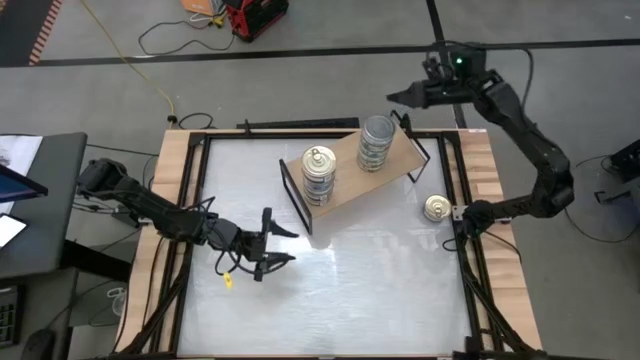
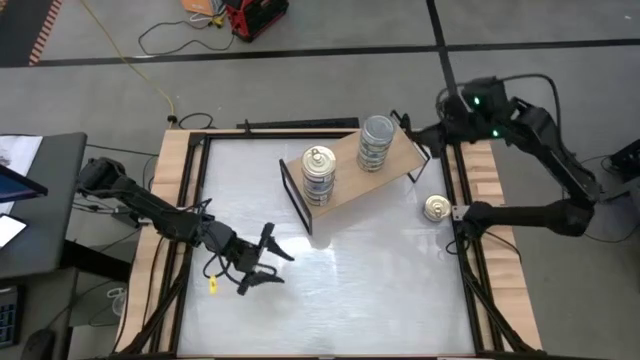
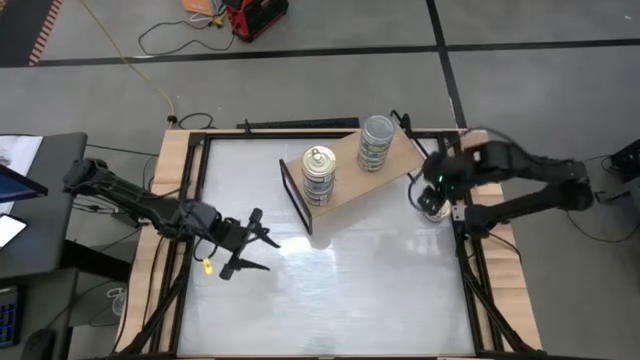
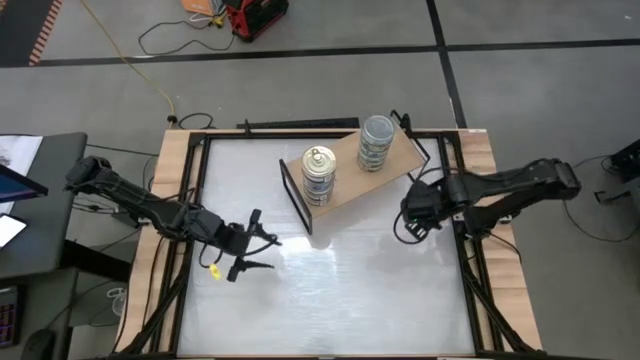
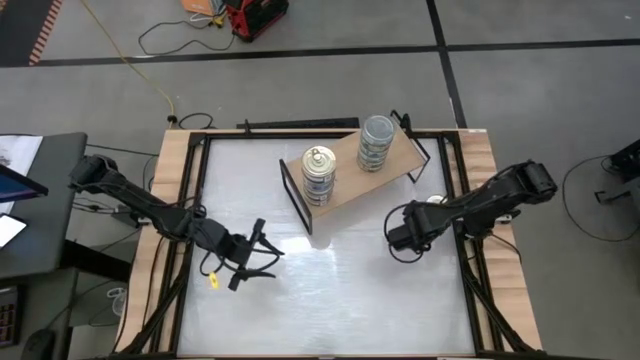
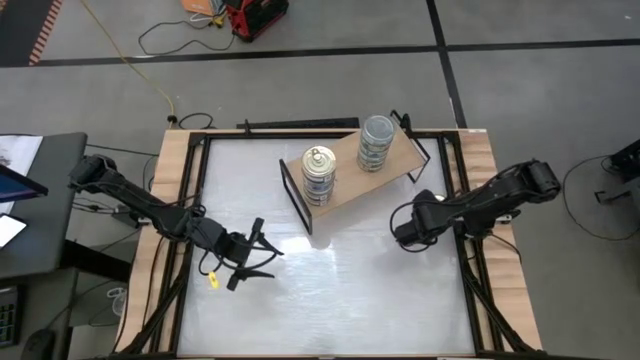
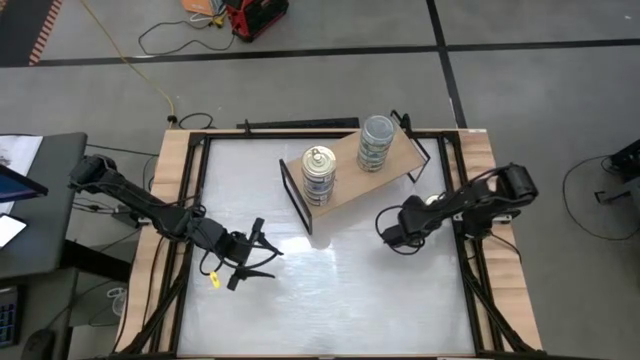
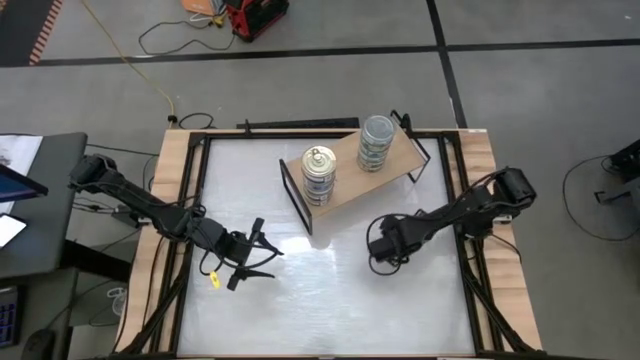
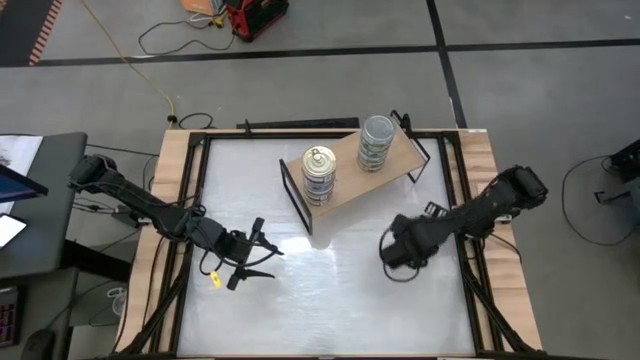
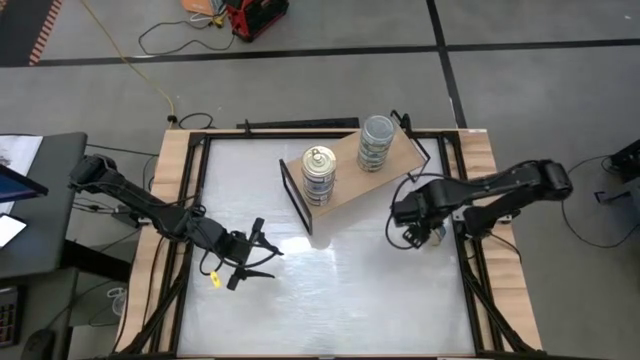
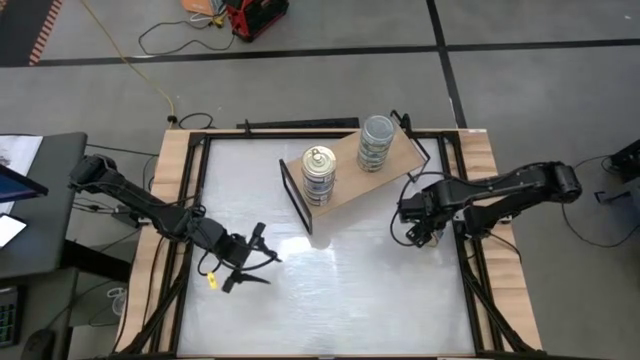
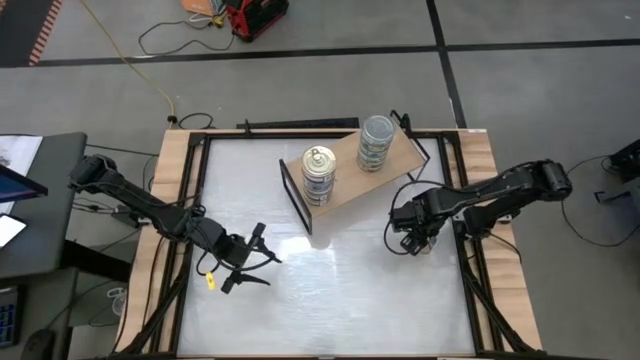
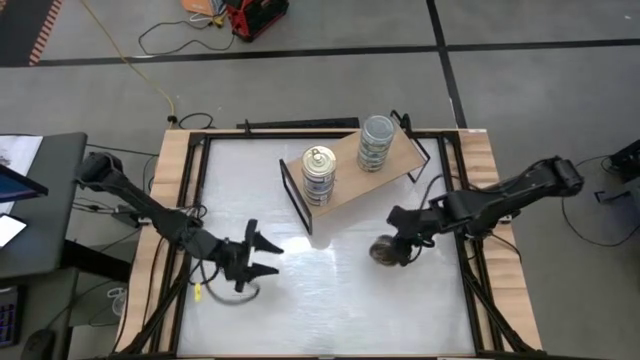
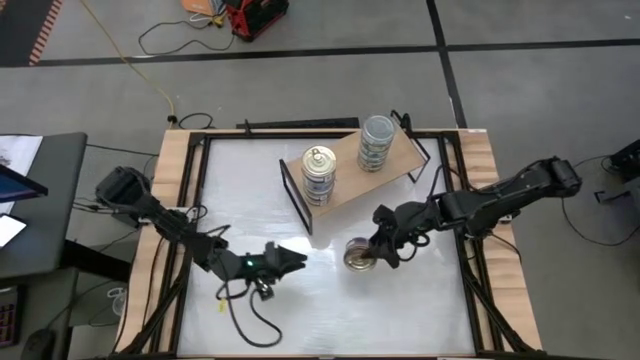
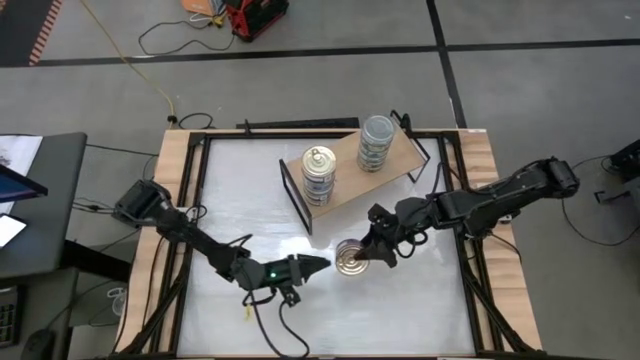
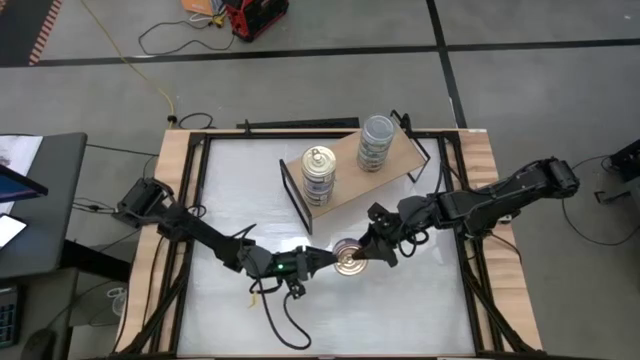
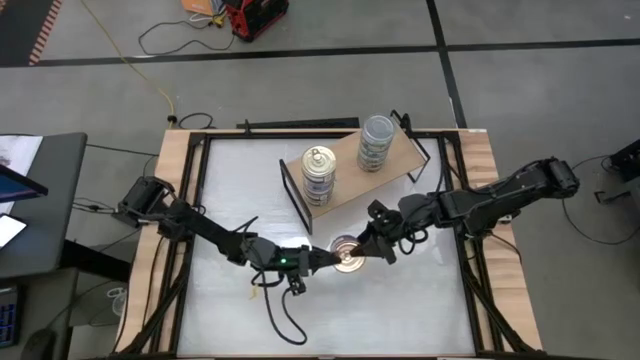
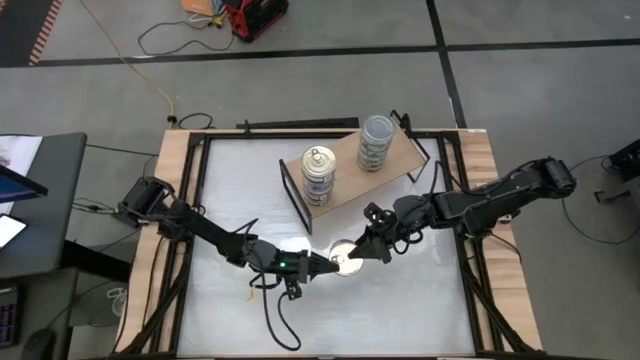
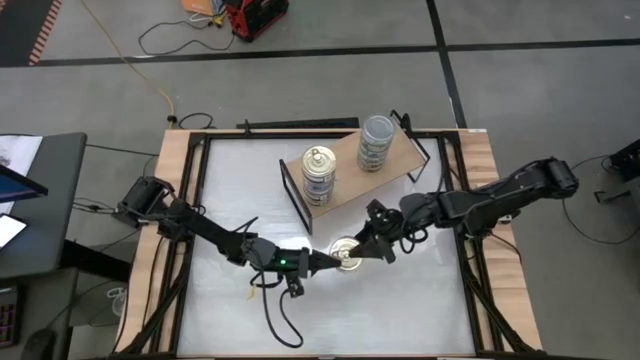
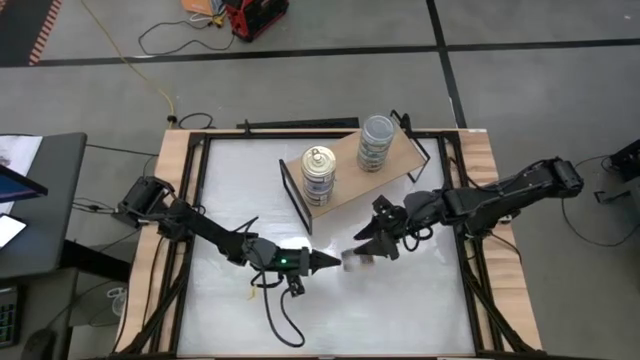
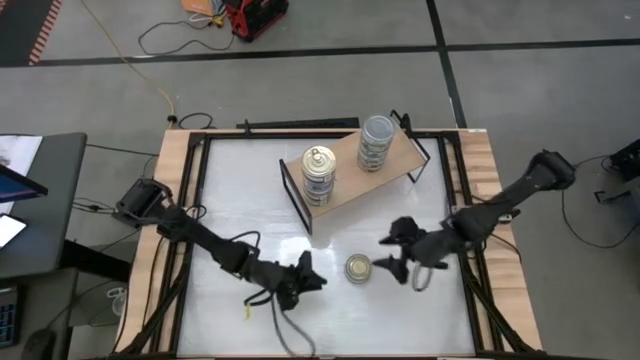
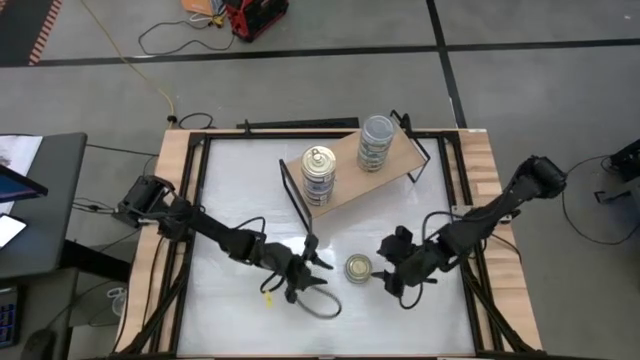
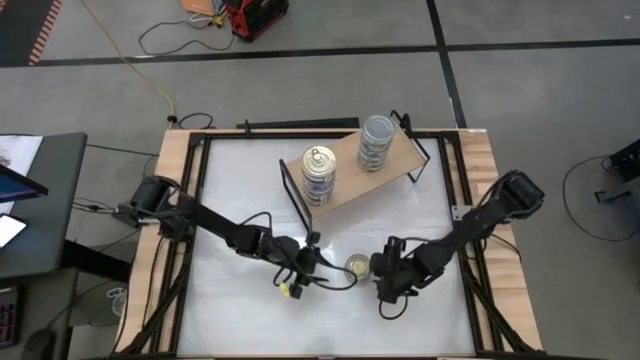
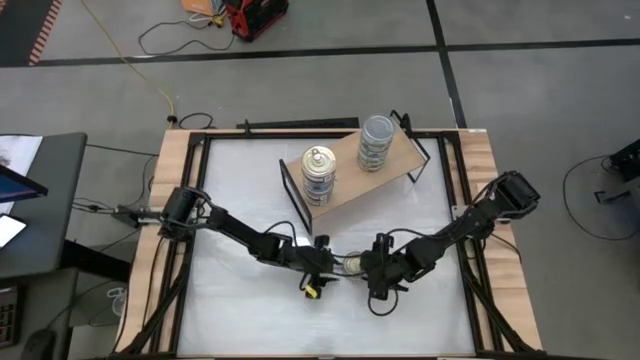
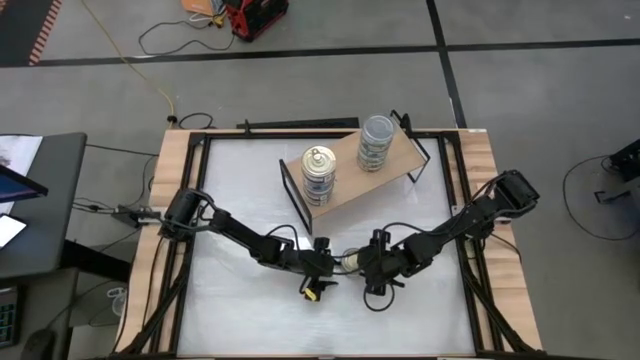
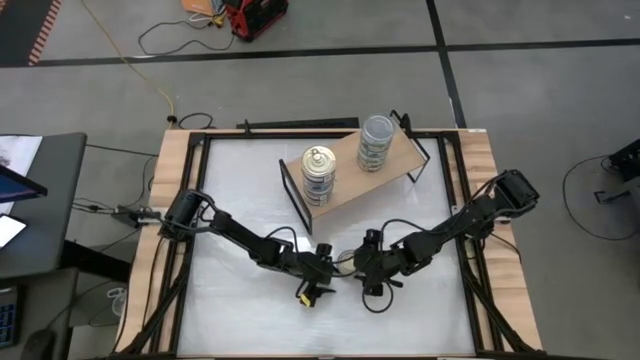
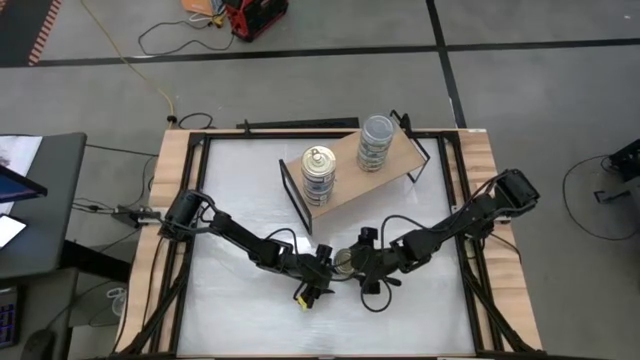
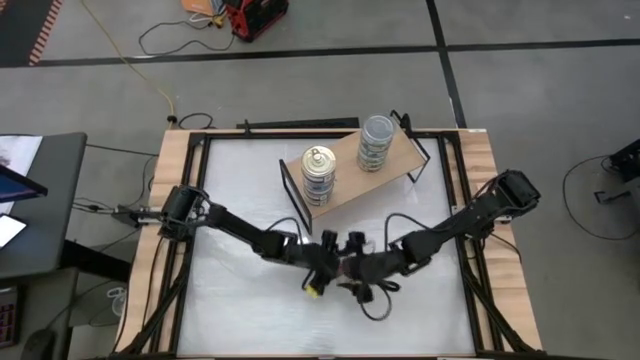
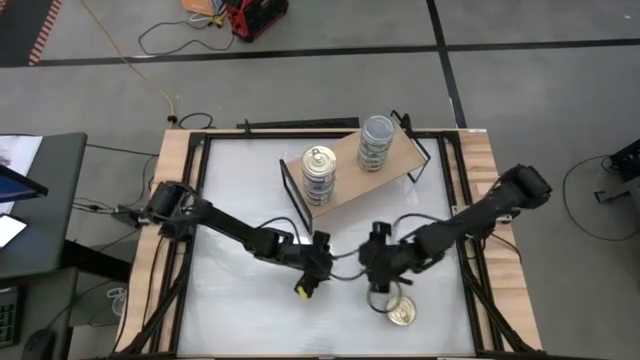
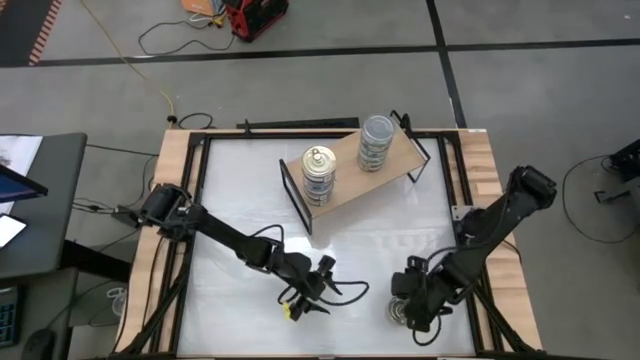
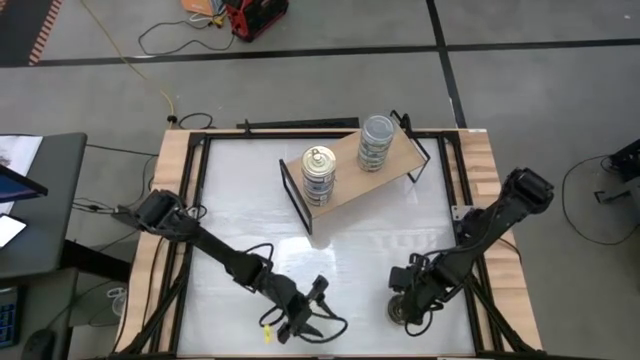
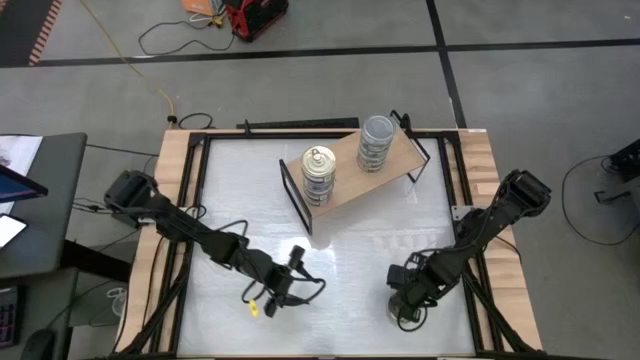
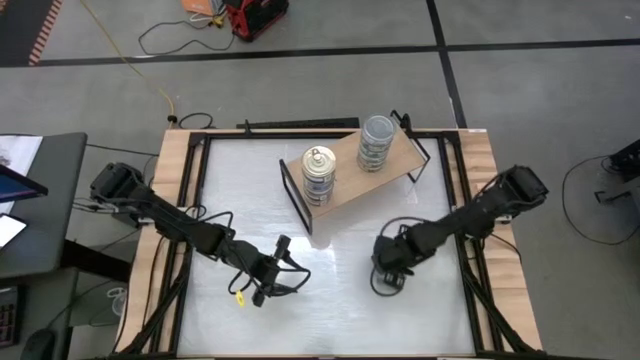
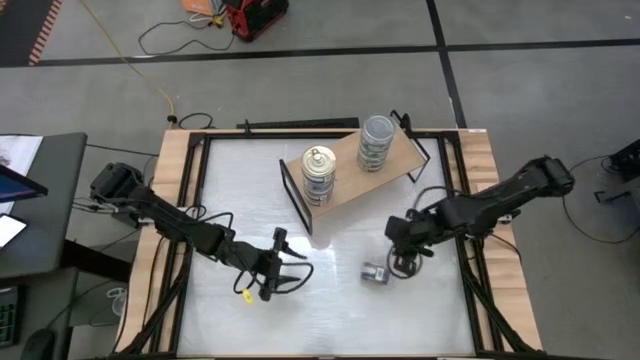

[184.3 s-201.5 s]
Task: Stack canned seafood by type on shelf
Stack the blue tuna can on top of the blue tuna can

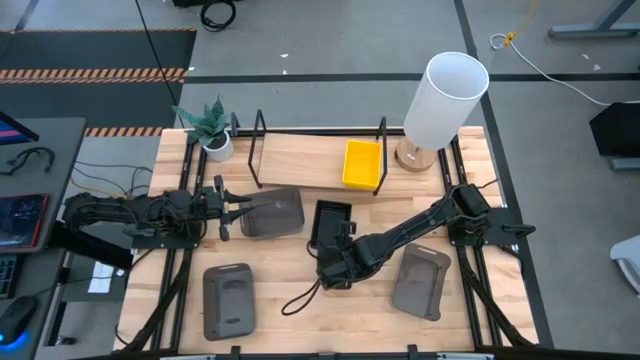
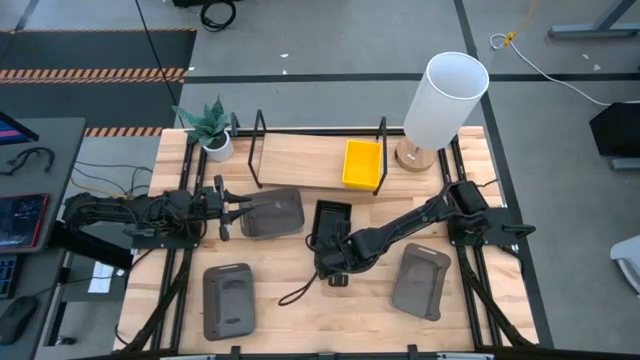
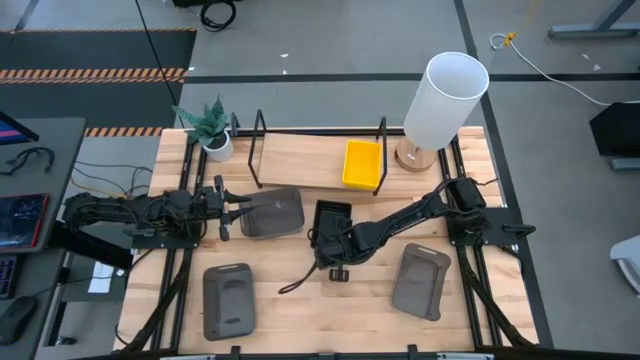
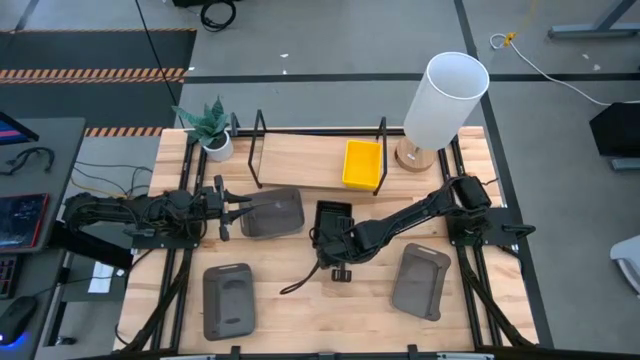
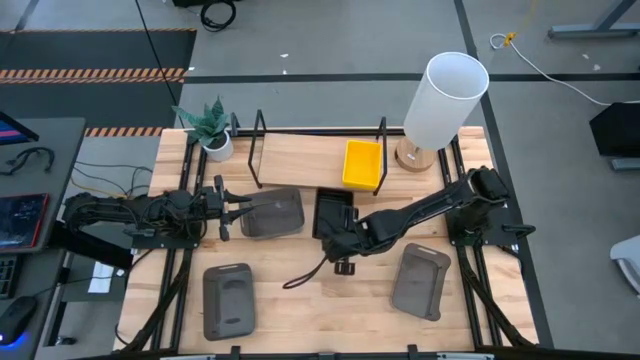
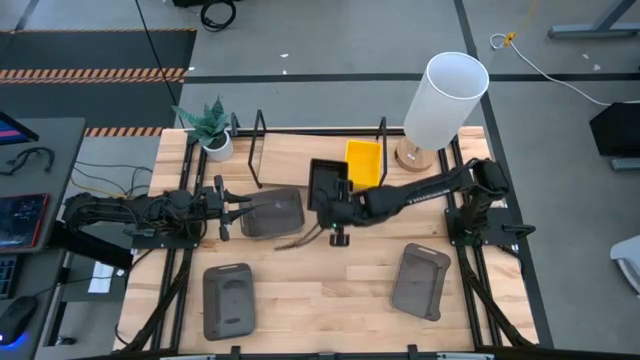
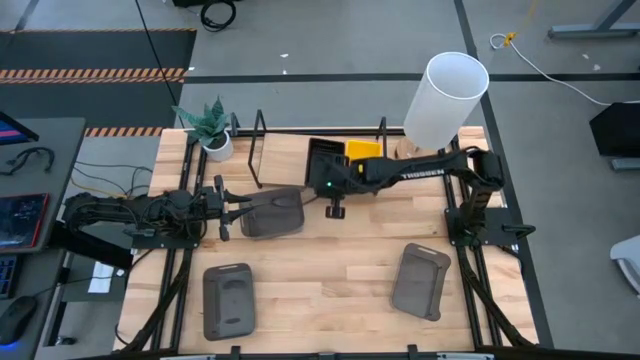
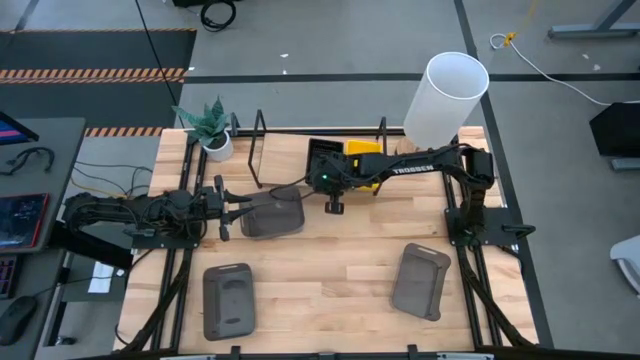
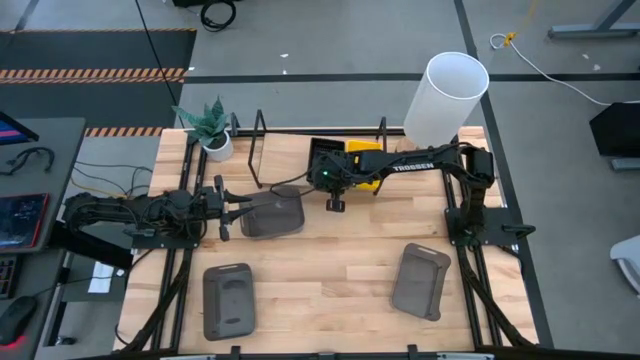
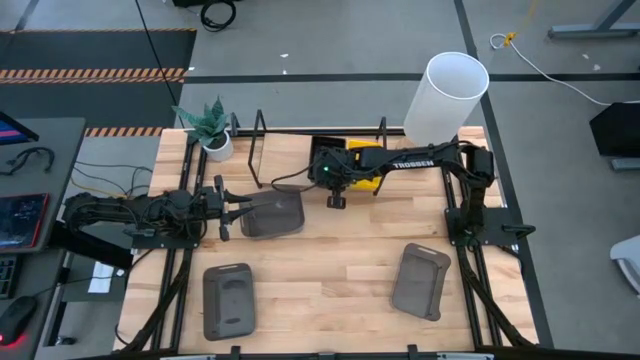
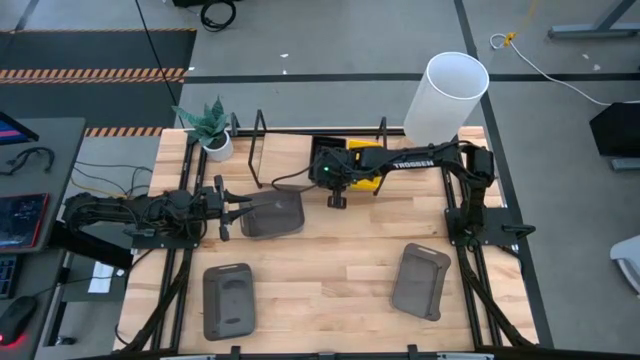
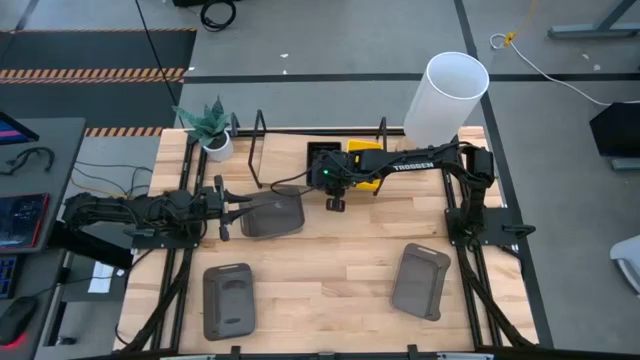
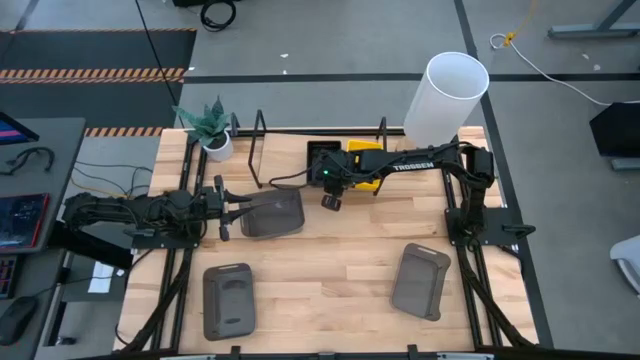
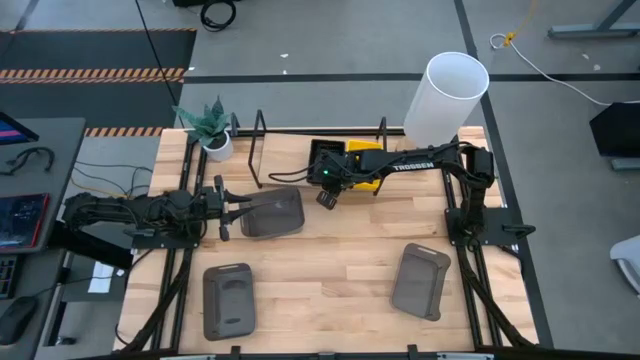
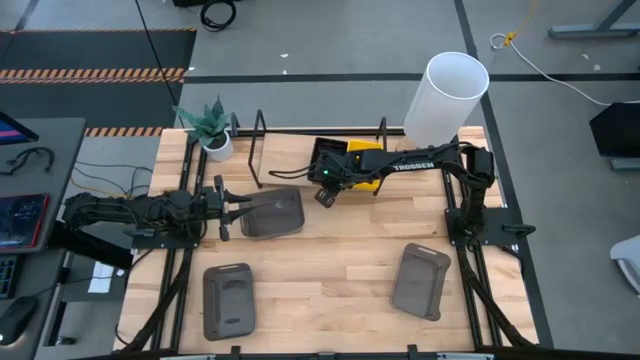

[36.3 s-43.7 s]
Task: Stack baskets on shelf by color
Put the stacked black bin on the shelf
